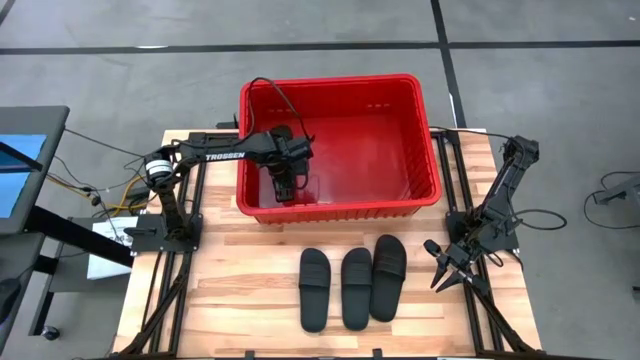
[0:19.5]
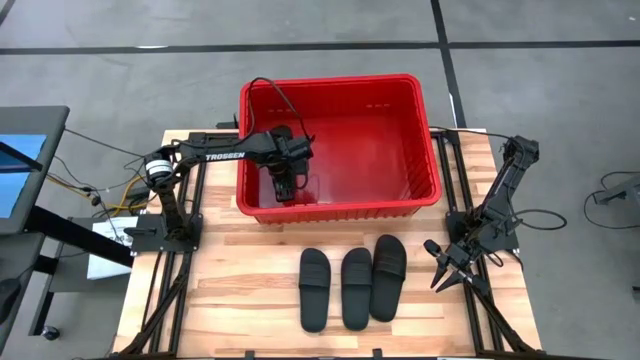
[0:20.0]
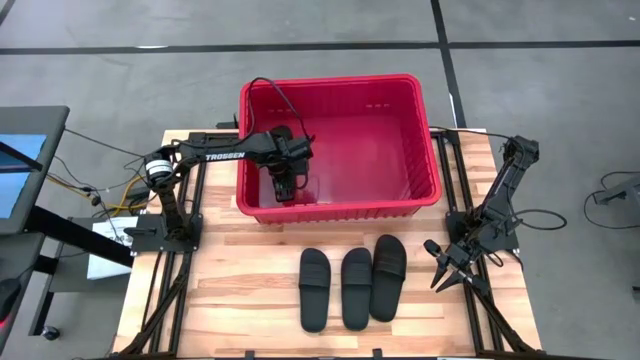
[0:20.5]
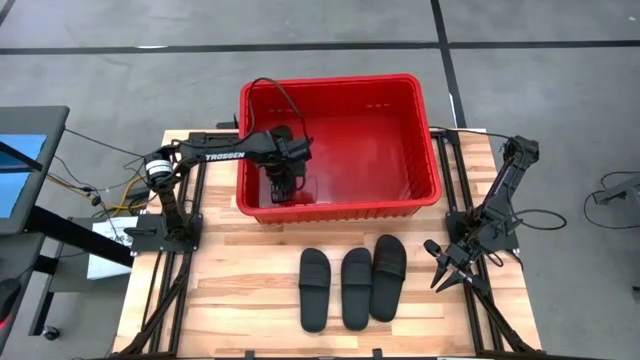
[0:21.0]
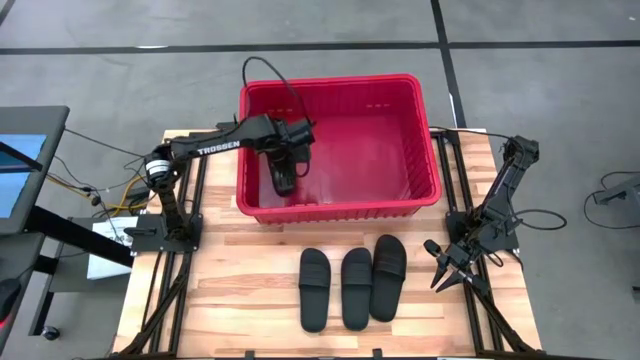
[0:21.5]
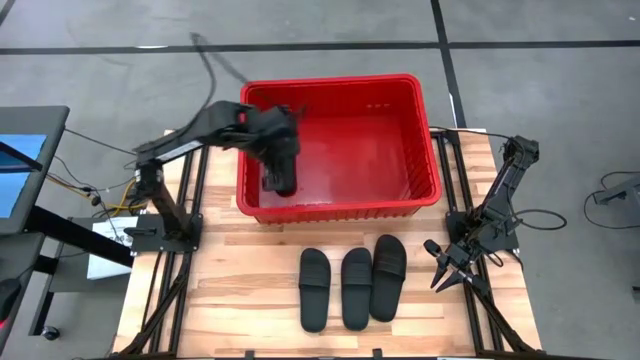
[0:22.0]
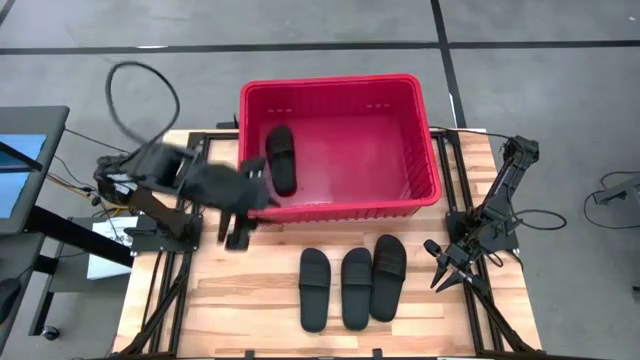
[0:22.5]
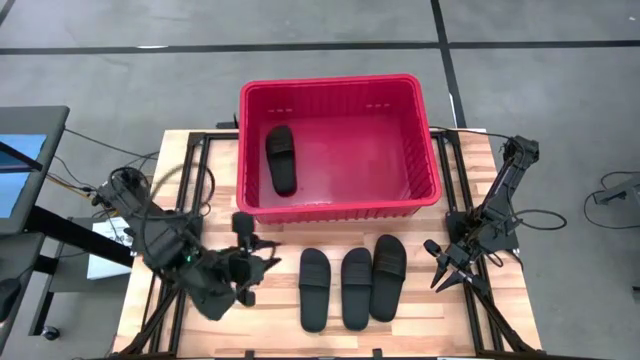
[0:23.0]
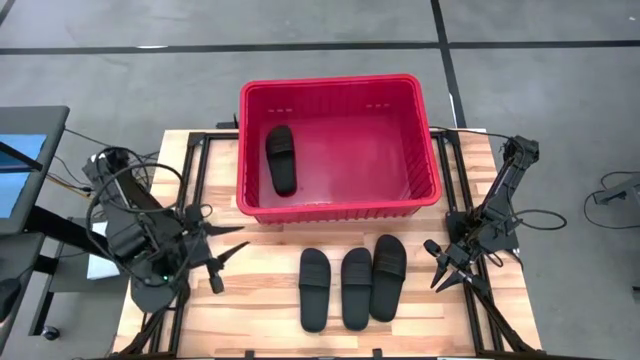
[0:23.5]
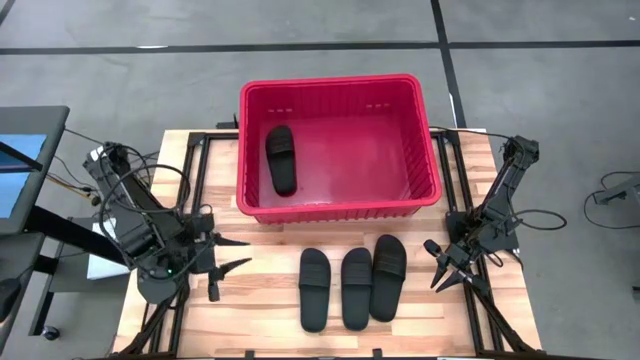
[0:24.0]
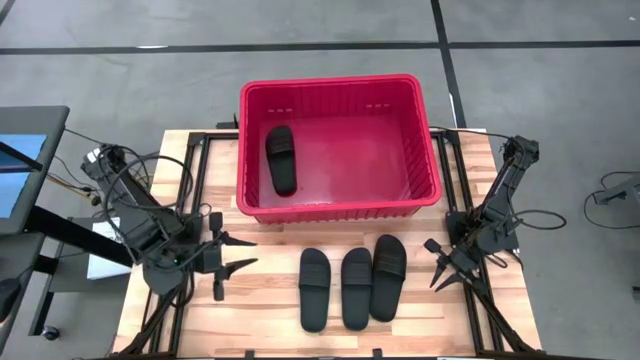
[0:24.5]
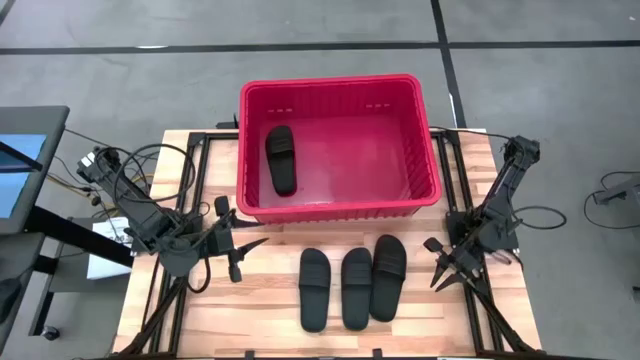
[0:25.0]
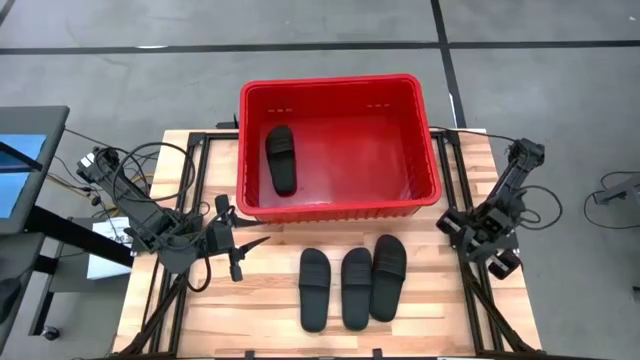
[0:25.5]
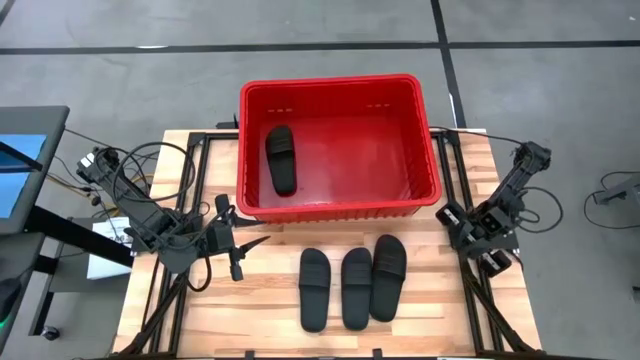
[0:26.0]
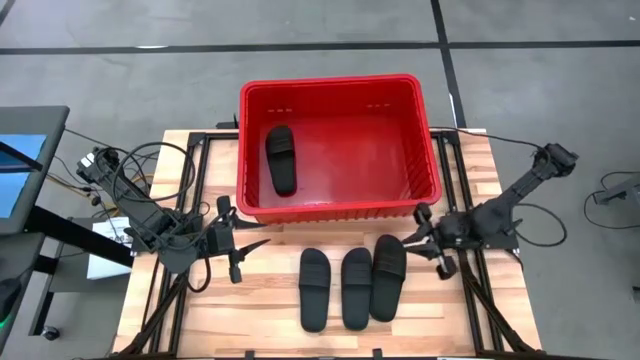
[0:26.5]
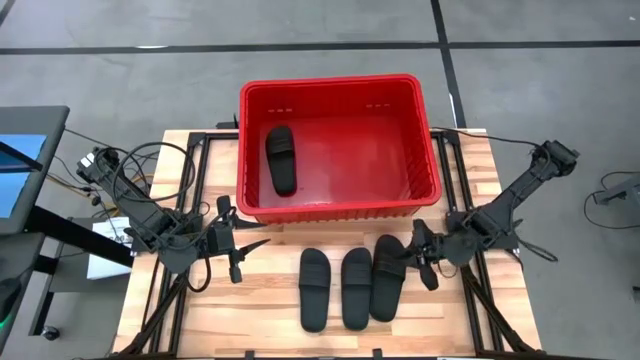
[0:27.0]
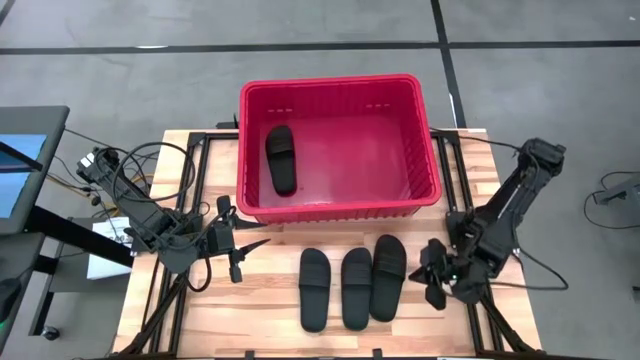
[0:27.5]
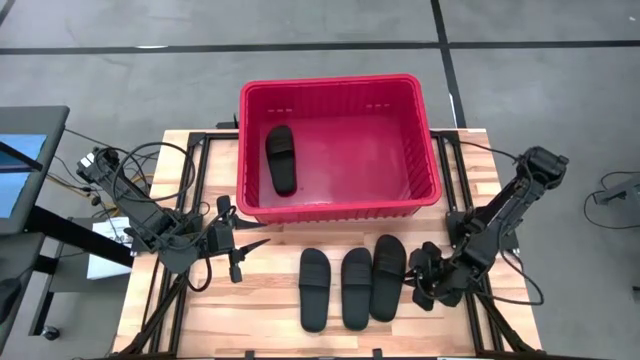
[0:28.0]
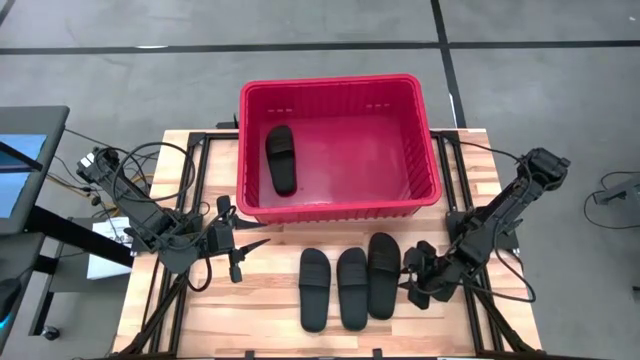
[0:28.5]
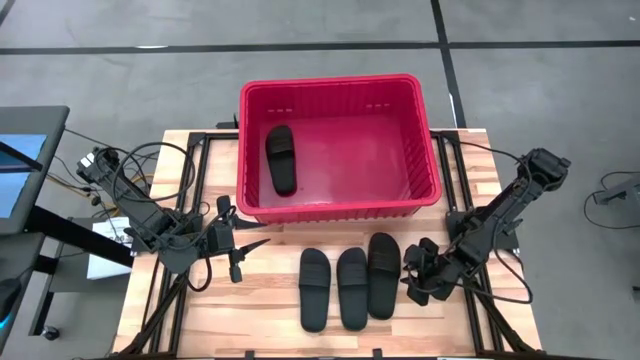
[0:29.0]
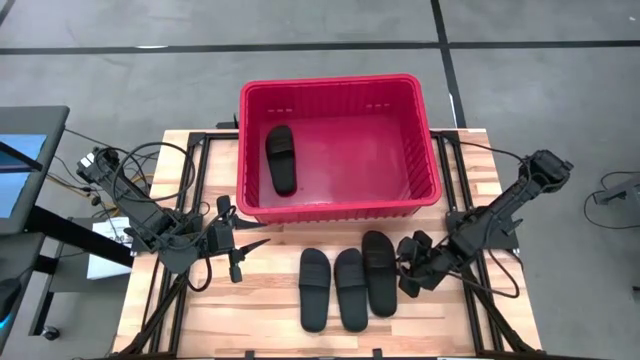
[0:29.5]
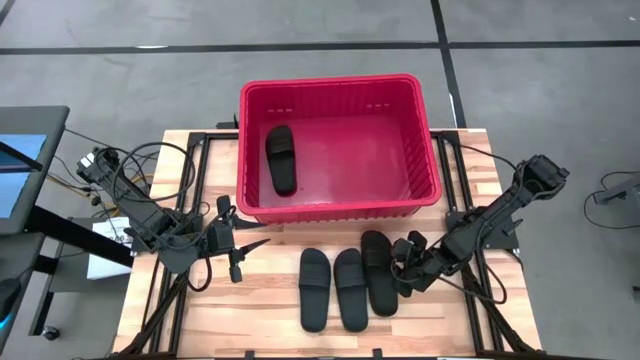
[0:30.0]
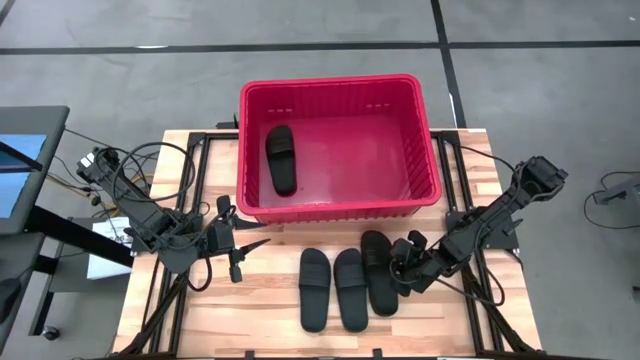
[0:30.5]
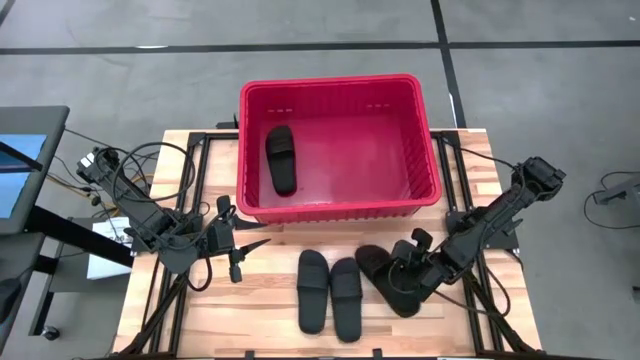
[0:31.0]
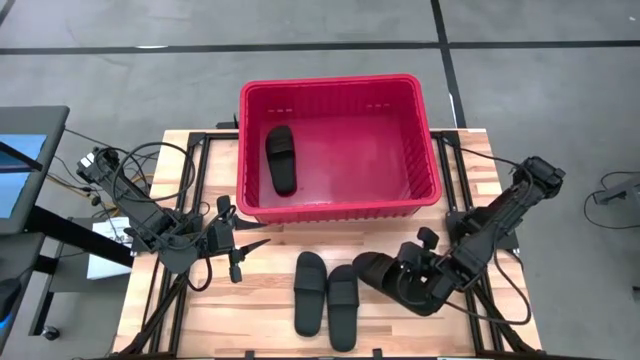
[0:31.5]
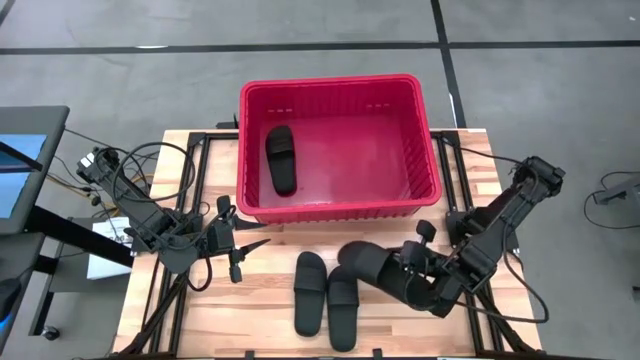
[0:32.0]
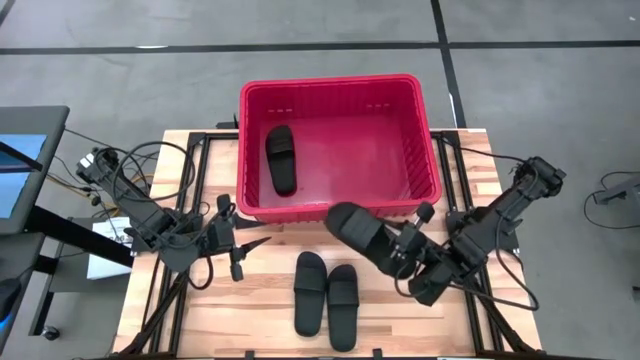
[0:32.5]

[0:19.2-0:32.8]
Task: Pick and place slides into bin
Put the black slides into the red bin

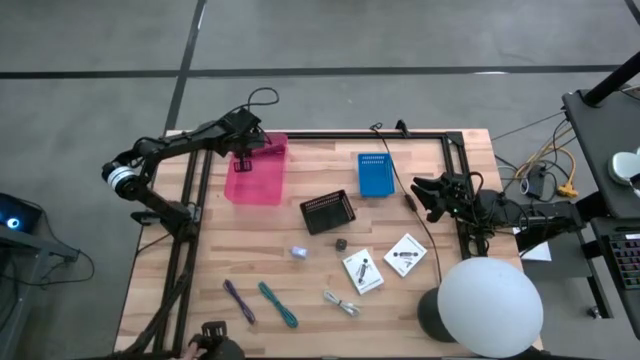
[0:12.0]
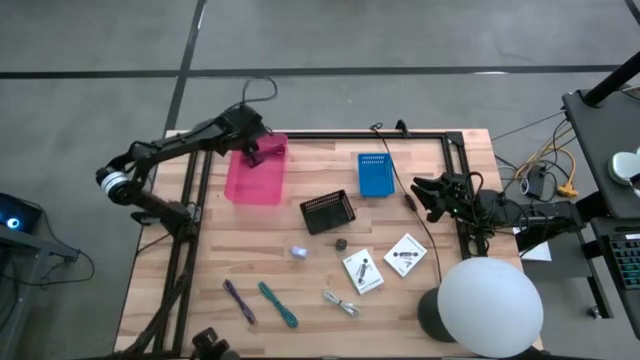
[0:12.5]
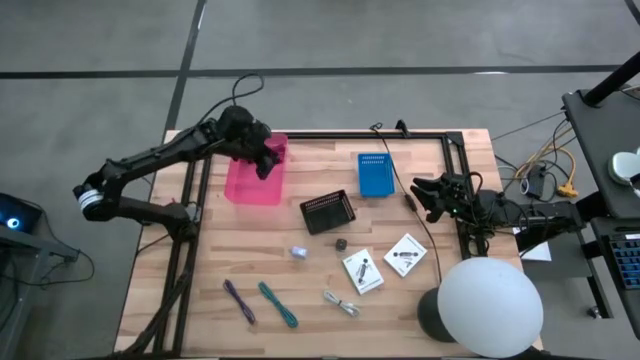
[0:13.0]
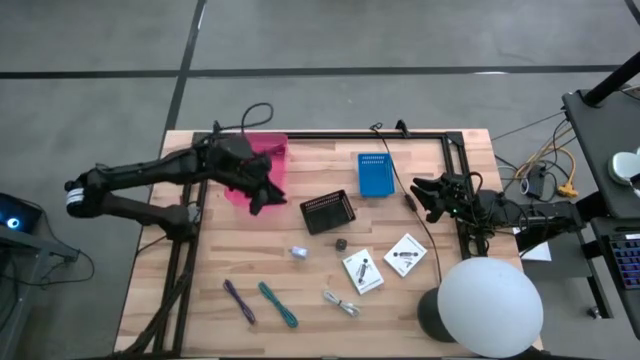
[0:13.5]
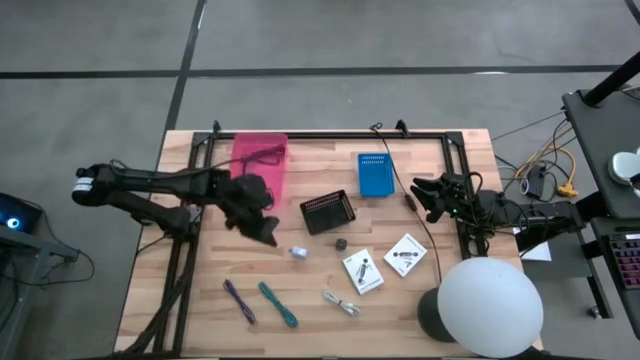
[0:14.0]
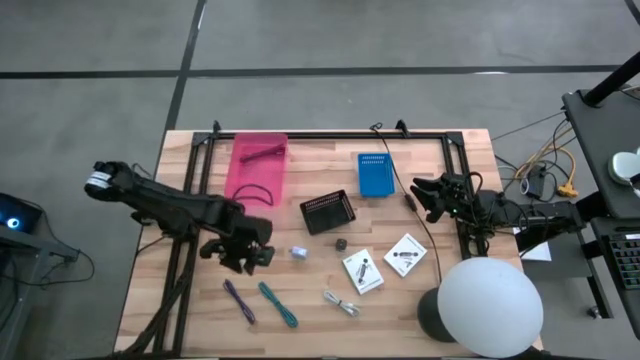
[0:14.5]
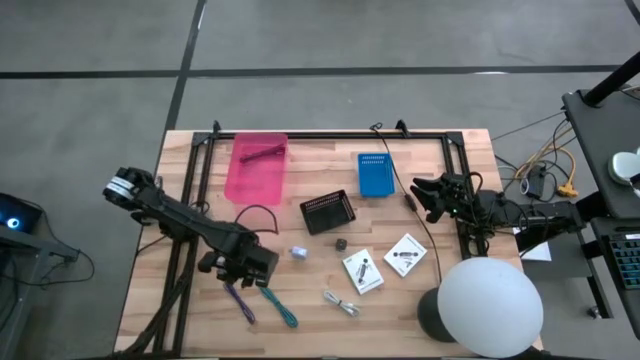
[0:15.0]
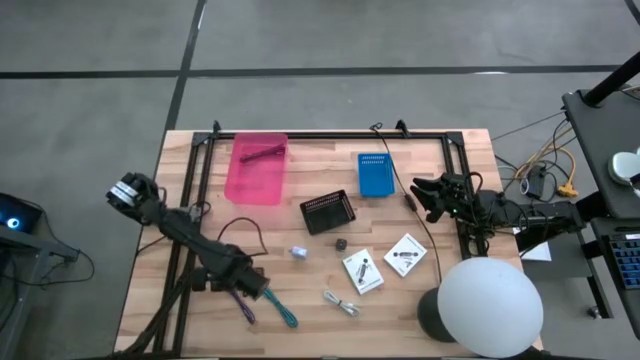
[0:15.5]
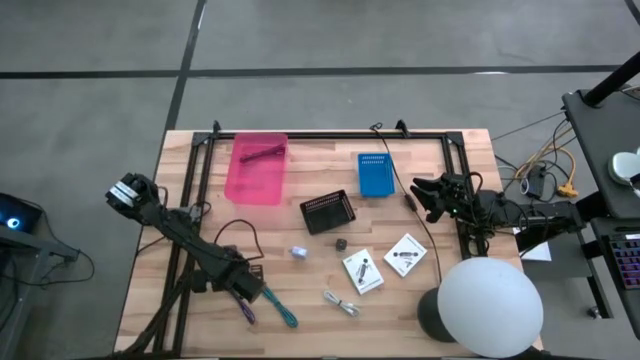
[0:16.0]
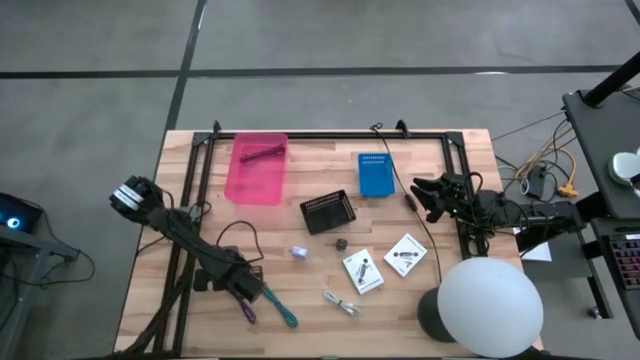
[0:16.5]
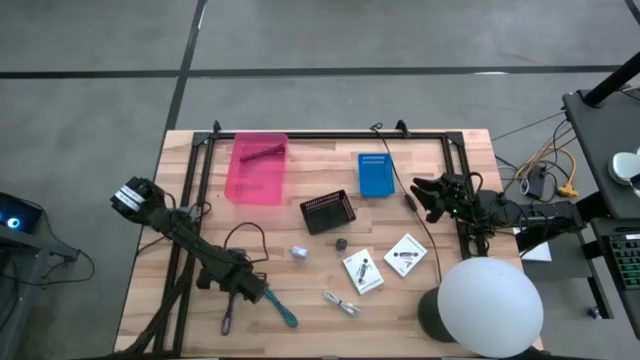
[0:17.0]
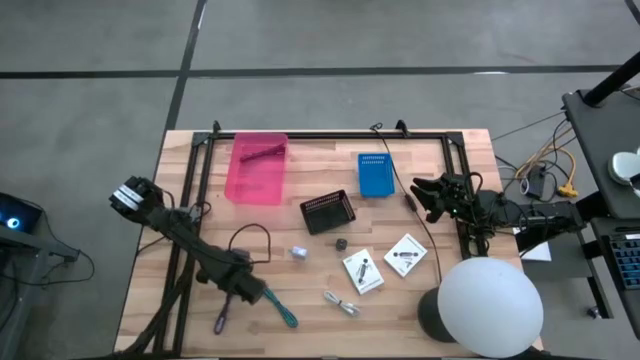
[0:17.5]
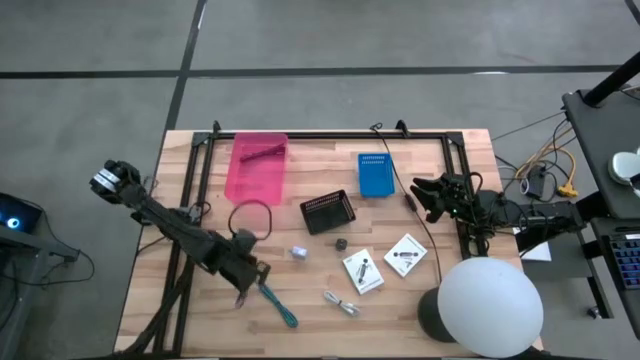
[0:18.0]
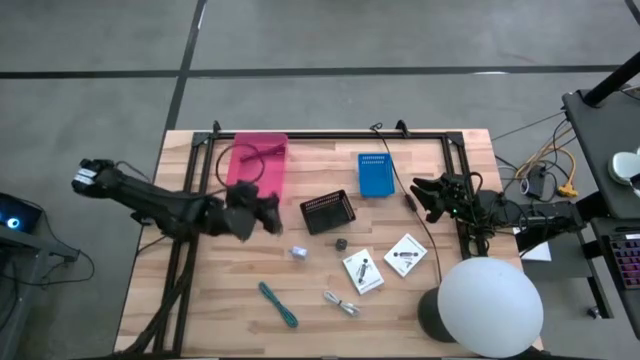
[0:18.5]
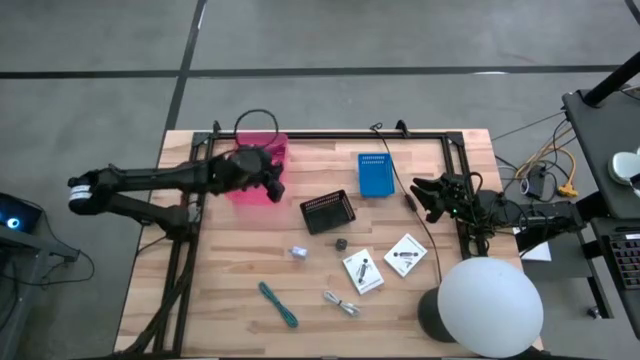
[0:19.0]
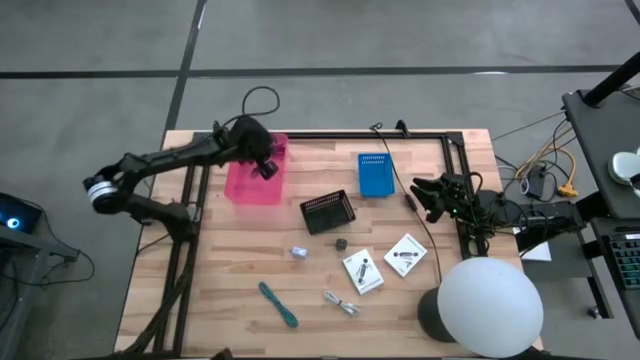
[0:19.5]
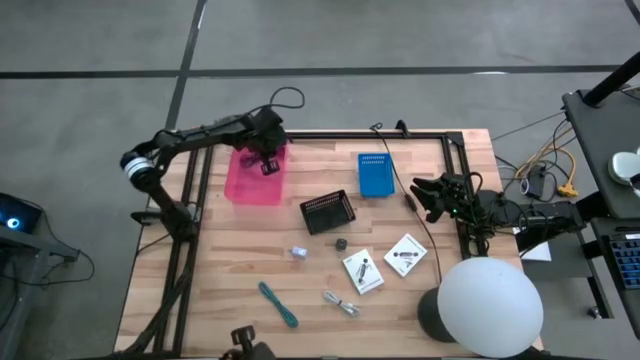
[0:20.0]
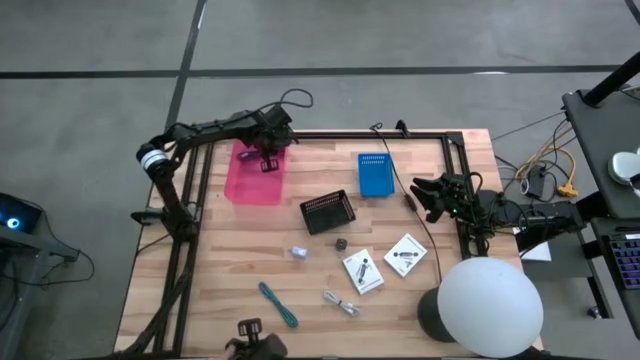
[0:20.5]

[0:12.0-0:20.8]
Task: Pick and place items into bin
Put the blue charger cable into the pink bin
